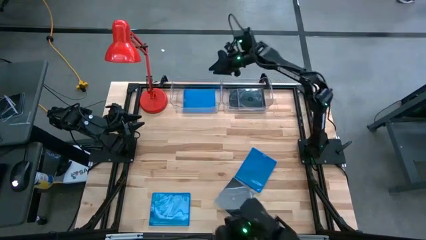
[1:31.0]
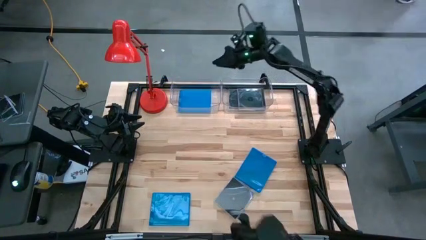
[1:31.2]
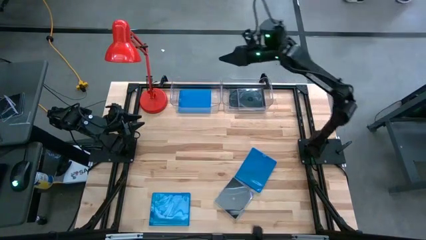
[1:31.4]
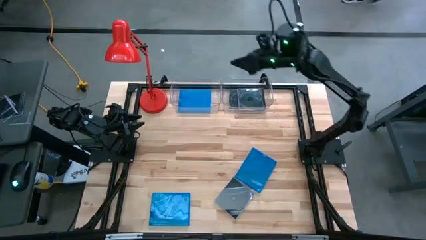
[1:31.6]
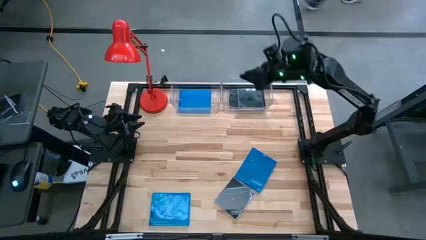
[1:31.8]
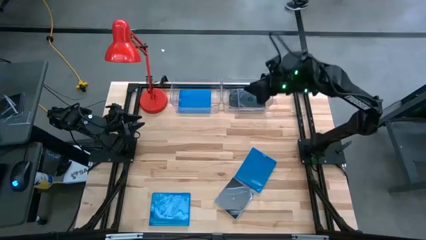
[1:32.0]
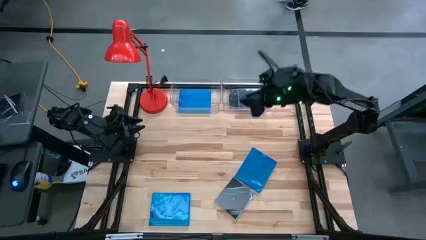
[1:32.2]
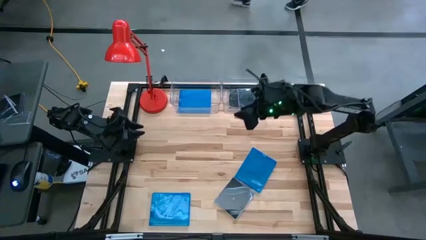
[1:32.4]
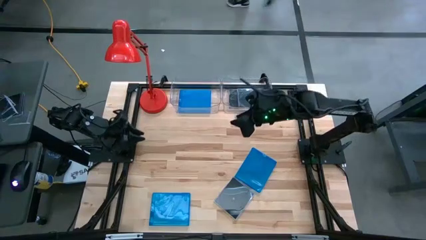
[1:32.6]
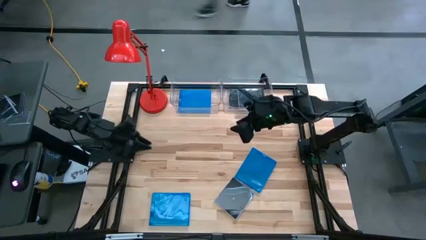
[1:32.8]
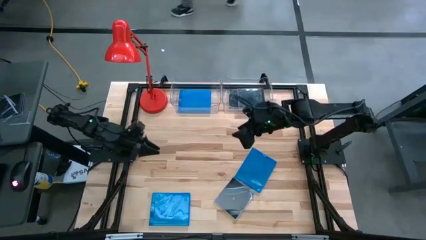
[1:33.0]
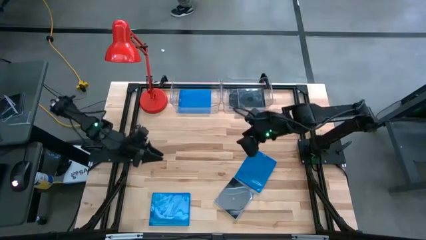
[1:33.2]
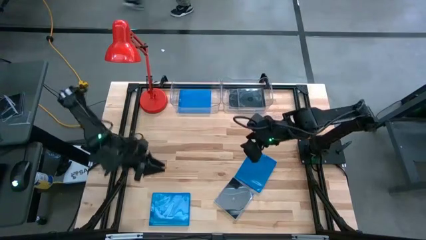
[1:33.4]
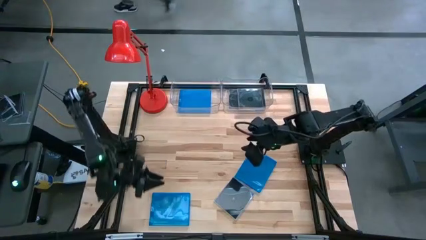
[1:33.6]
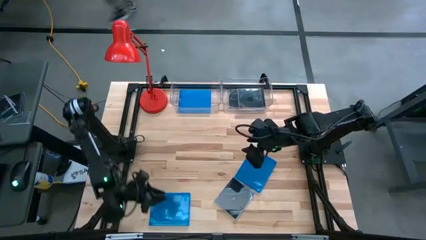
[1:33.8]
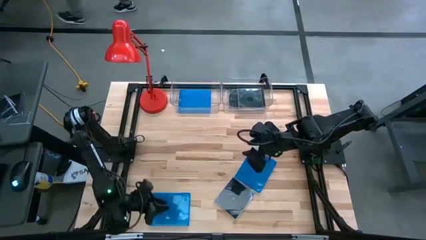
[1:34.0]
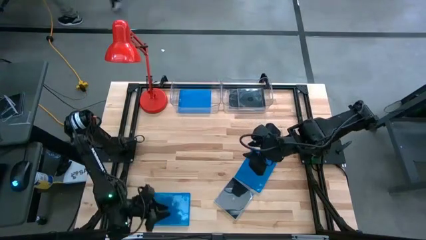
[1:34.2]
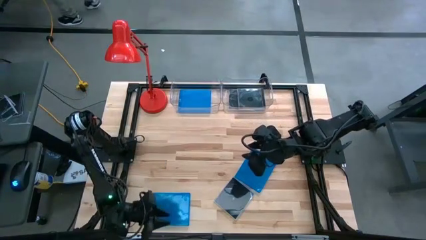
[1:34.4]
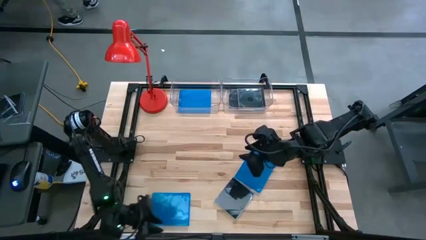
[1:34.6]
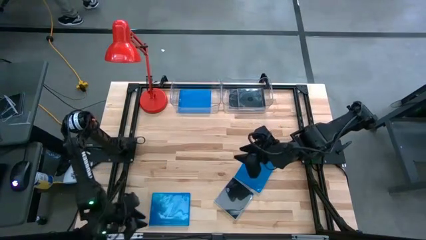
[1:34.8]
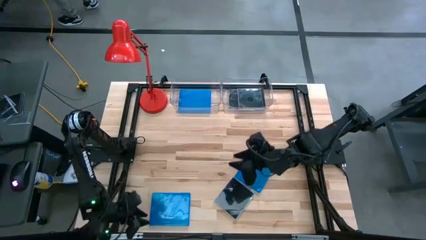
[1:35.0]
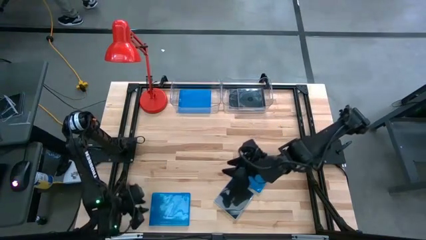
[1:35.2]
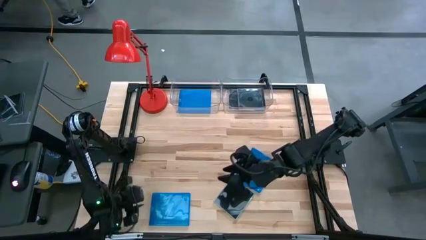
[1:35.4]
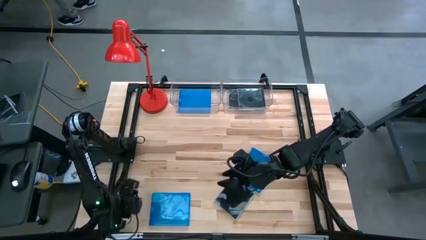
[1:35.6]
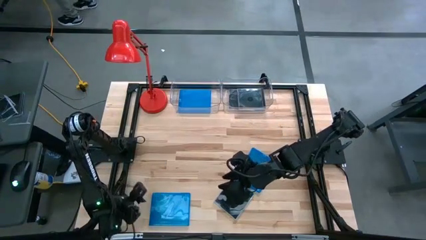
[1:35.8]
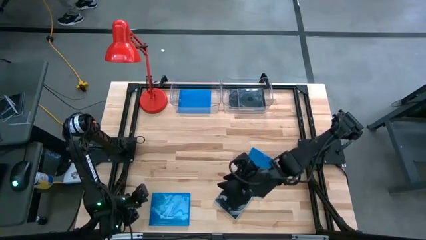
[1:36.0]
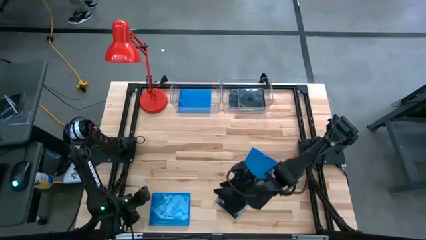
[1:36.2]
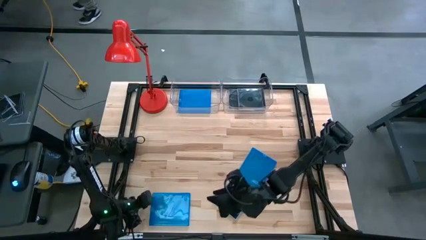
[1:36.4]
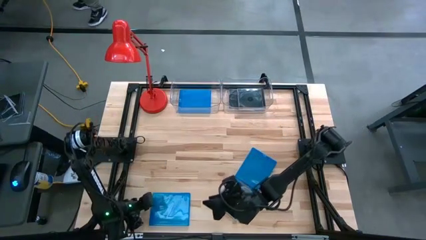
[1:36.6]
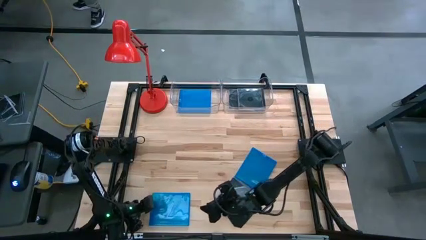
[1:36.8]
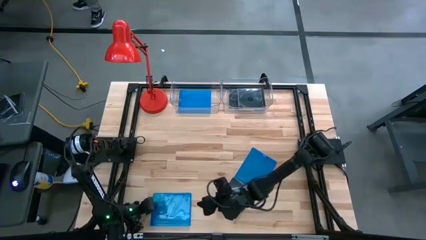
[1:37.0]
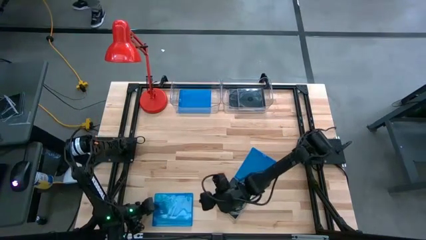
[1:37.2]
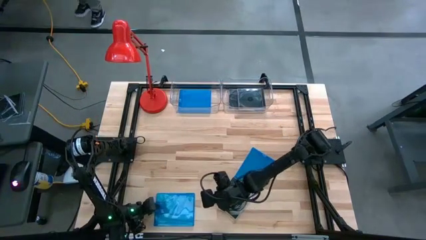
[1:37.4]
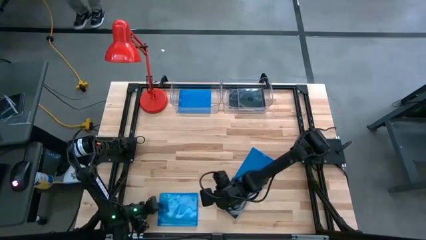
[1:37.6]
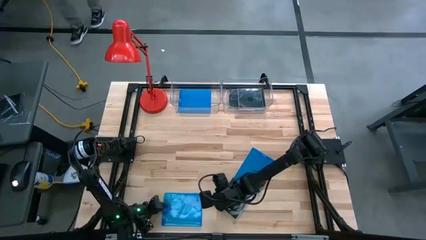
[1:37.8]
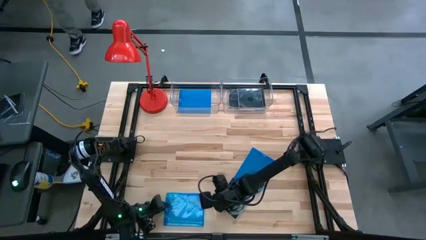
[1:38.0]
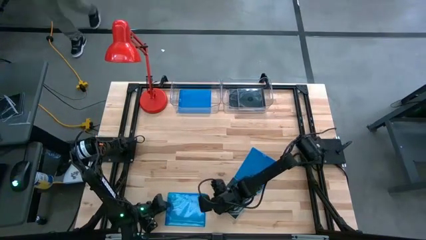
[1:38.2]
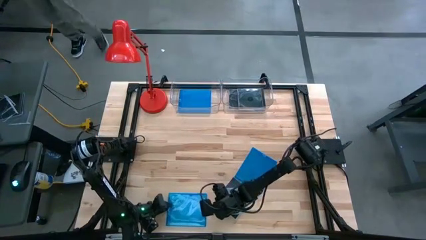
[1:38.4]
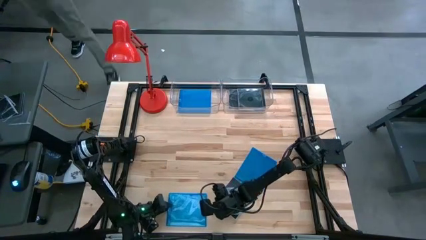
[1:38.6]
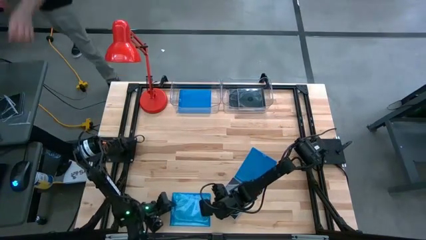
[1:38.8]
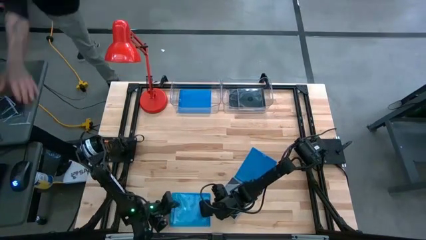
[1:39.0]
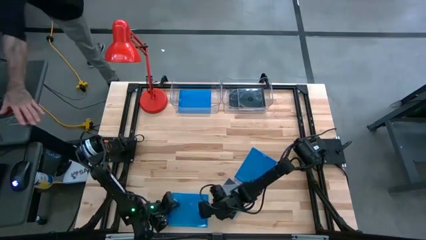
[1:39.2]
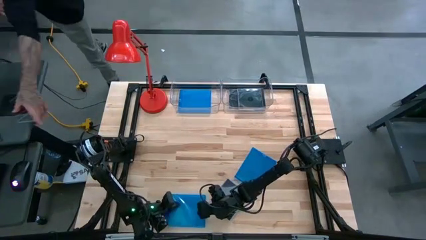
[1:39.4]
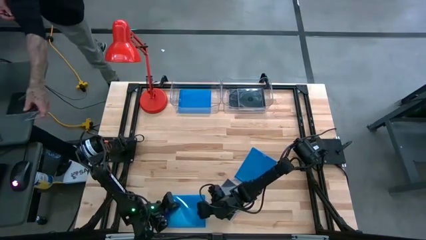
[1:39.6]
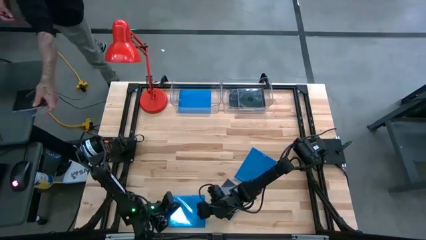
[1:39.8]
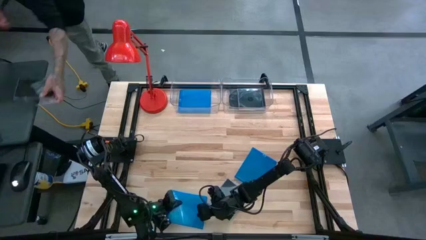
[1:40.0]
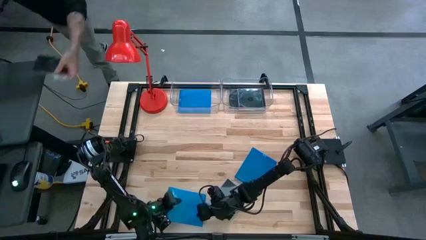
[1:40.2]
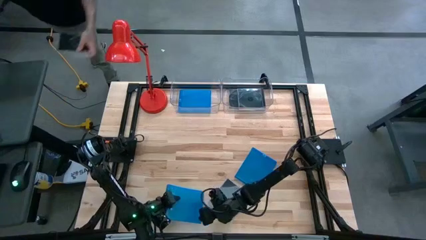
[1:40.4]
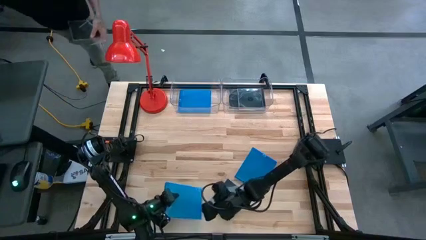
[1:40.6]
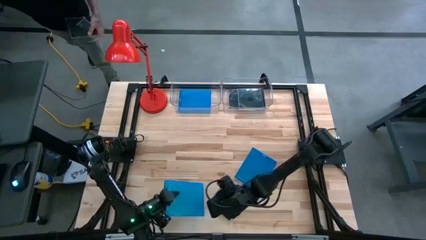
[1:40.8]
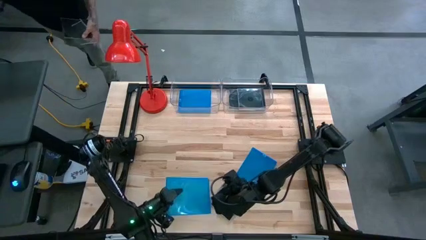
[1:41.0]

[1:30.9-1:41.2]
Task: Pick & place jewel cases by type
Put the left blue cd case into the left transparent bin

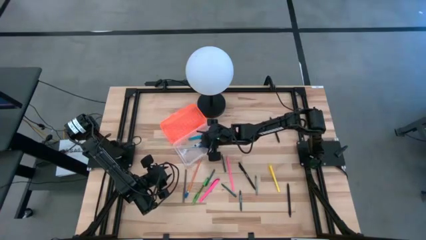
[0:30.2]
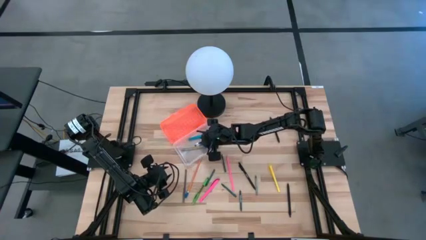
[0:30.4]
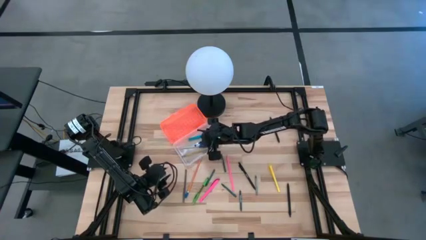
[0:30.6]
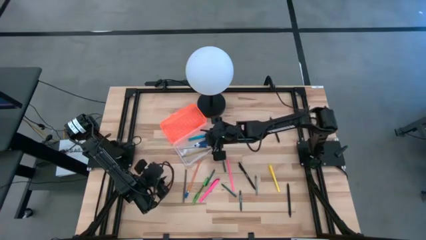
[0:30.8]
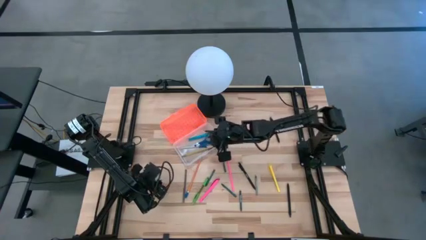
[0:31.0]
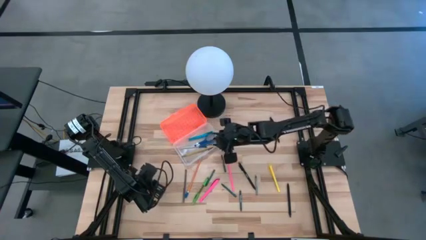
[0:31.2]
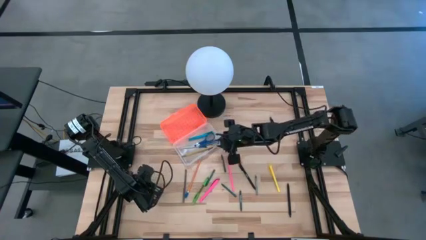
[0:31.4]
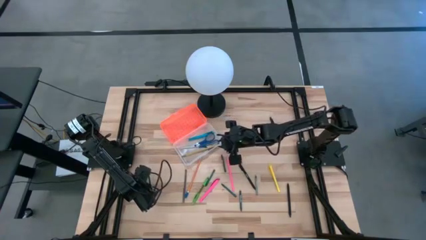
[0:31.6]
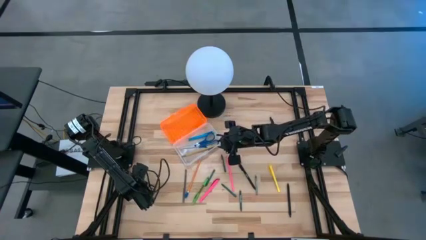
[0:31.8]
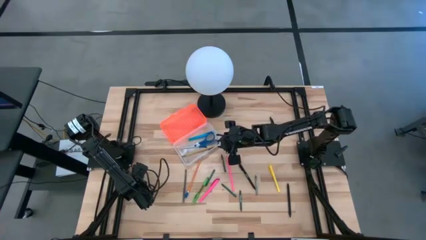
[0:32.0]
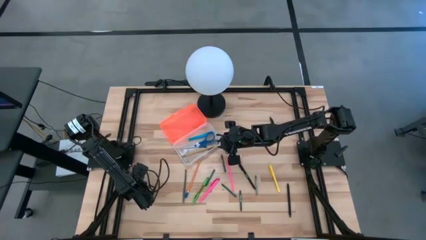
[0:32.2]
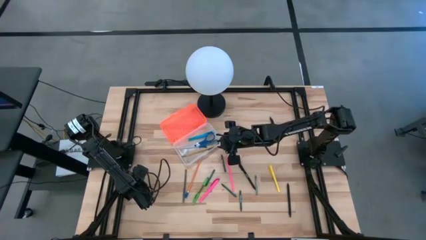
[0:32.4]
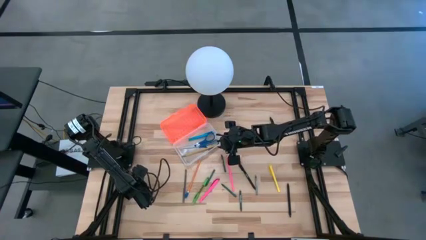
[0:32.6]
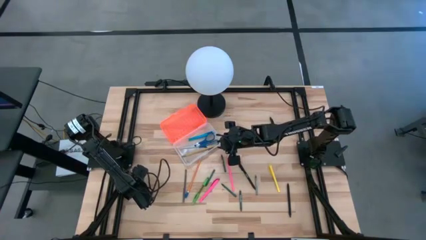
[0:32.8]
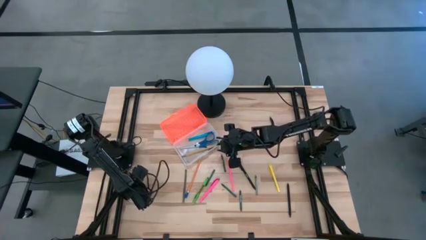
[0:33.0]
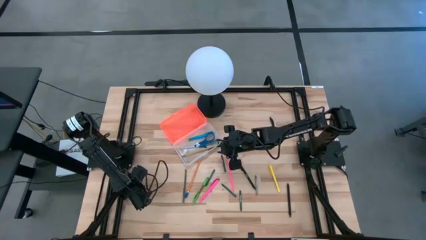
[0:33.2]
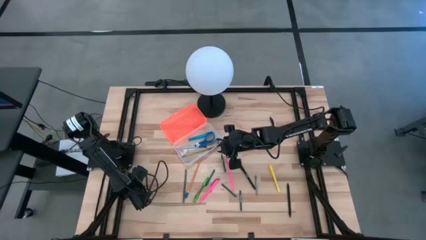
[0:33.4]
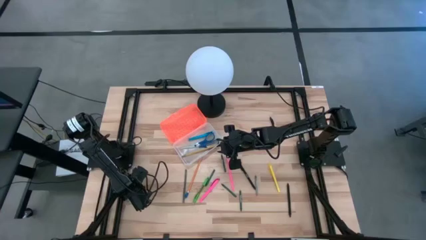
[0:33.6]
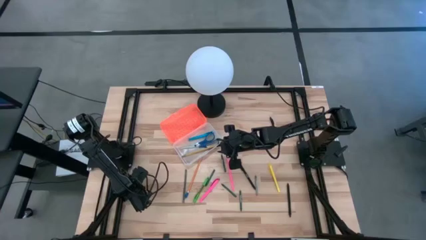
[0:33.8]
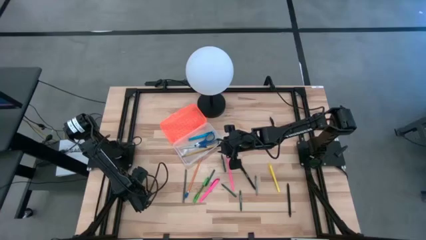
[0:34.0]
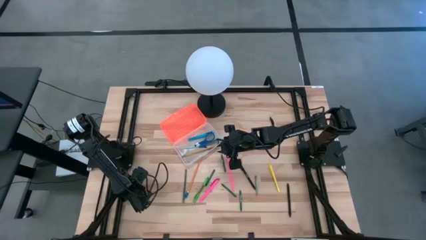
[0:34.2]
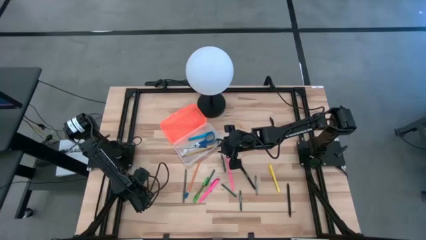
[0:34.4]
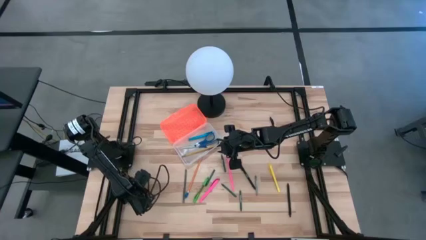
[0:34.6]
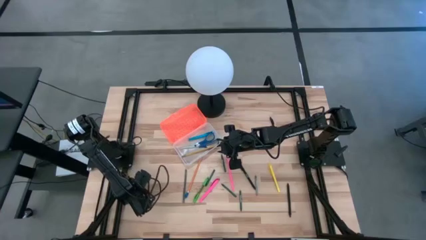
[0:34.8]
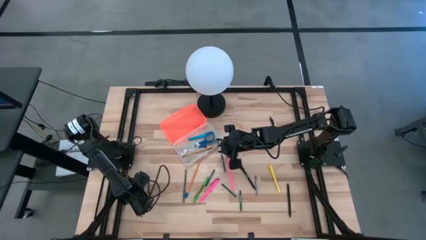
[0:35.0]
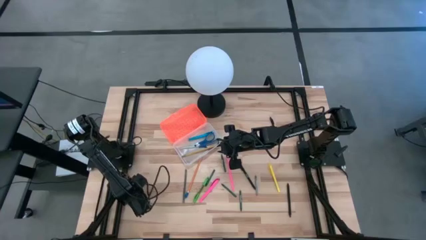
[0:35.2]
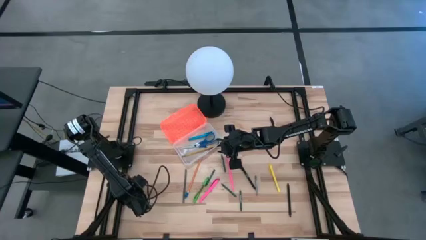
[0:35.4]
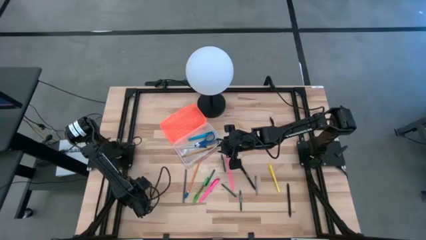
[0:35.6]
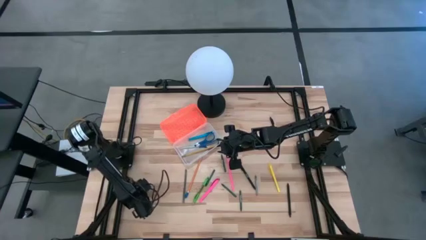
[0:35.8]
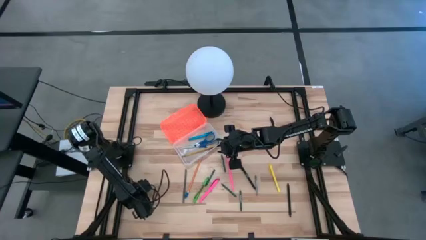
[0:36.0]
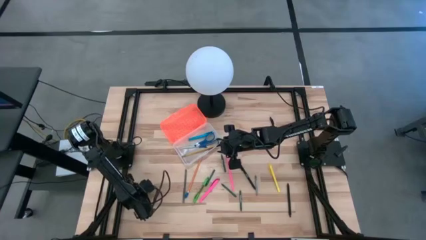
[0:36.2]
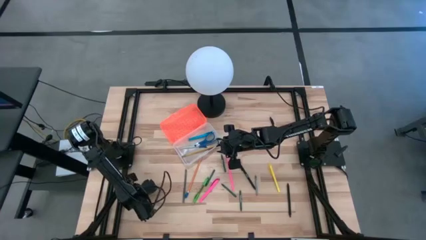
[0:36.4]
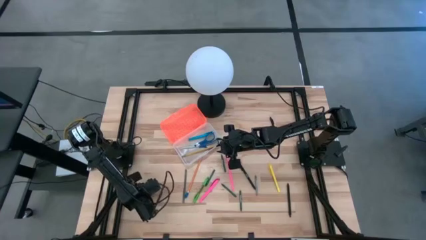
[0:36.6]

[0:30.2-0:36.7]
Task: Pick & place school supplies into a supply box
Put the left gray crayon into the orange supply box
